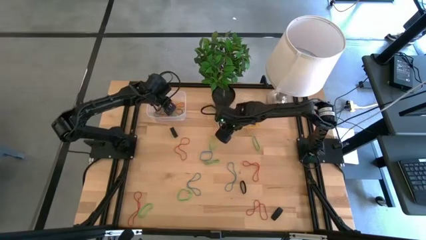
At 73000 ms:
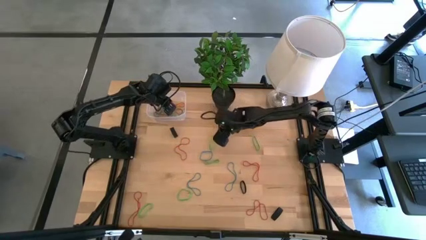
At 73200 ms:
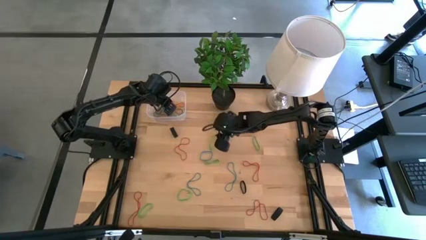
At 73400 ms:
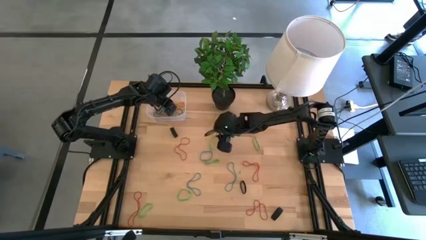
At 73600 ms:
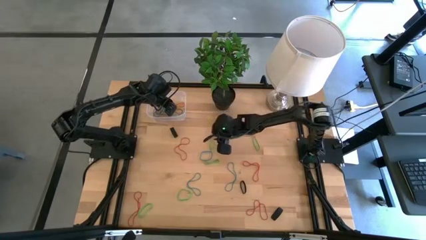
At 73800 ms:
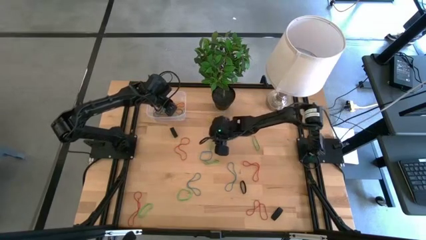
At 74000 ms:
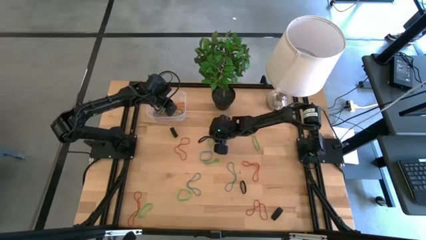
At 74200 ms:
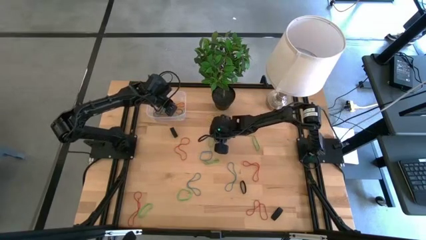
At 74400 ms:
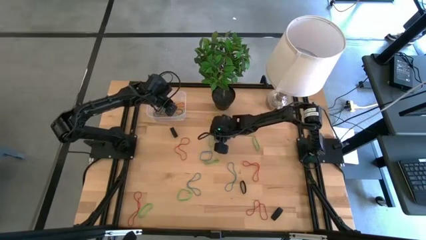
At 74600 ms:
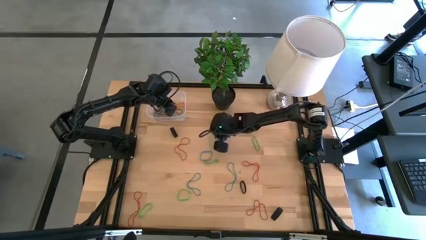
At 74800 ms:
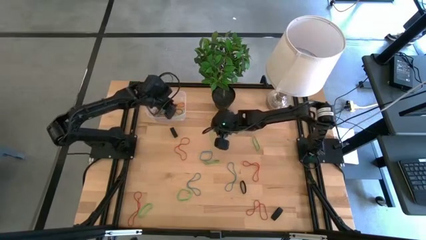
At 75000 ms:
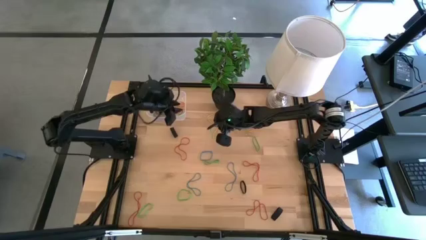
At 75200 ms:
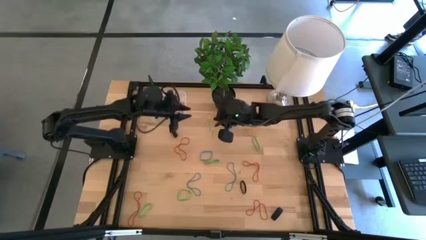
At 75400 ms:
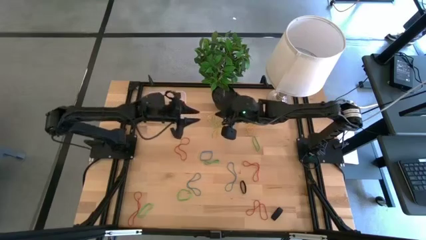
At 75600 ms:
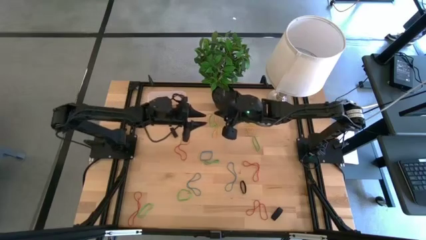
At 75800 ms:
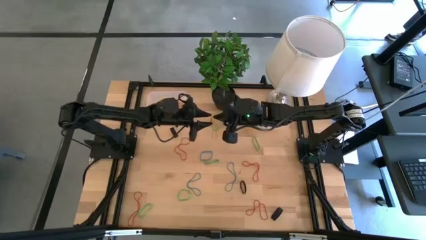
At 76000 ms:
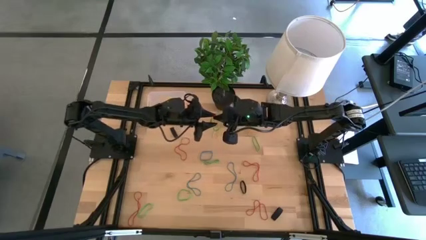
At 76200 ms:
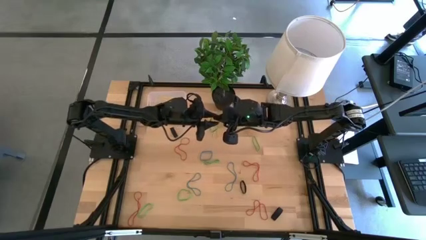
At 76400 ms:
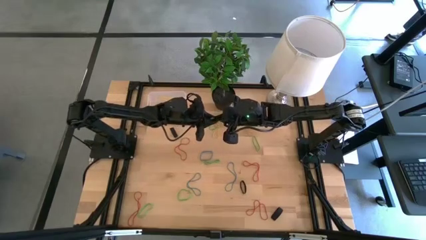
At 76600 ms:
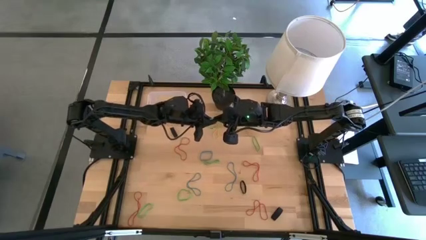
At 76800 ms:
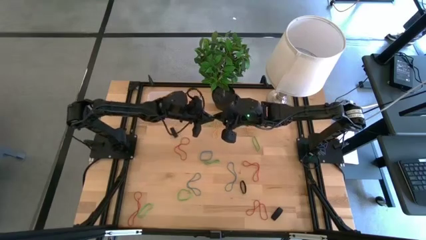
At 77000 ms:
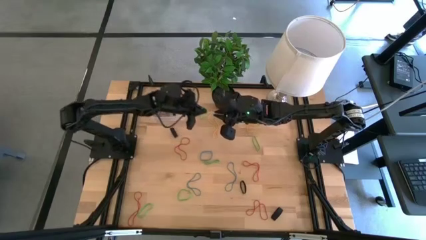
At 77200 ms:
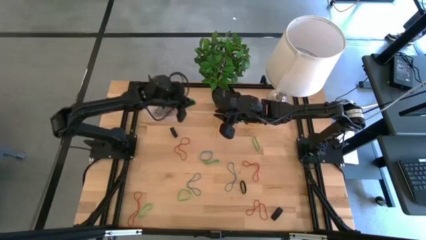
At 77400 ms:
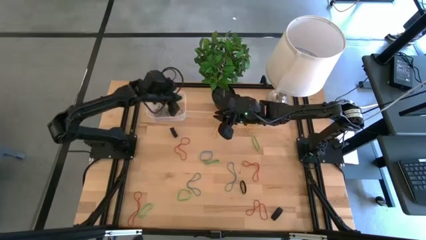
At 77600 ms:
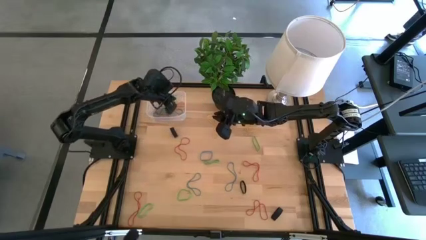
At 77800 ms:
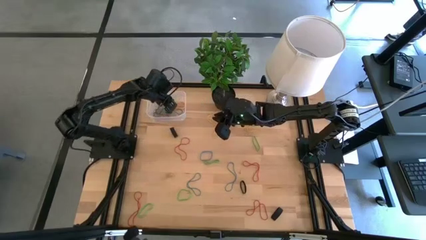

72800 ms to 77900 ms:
Task: Pick and place rubber bands into bin
Put the green rubber band into the transparent bin

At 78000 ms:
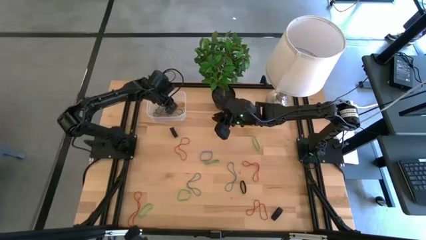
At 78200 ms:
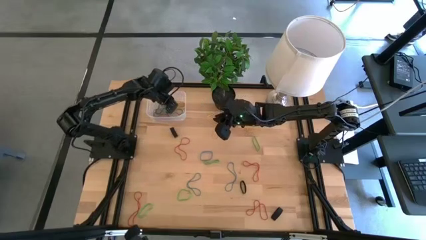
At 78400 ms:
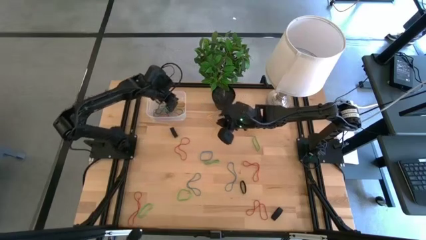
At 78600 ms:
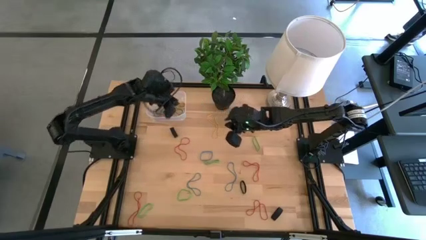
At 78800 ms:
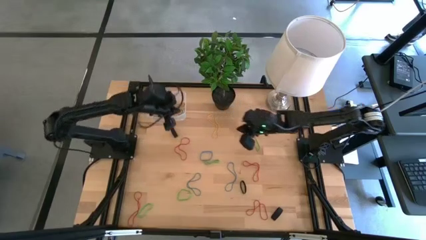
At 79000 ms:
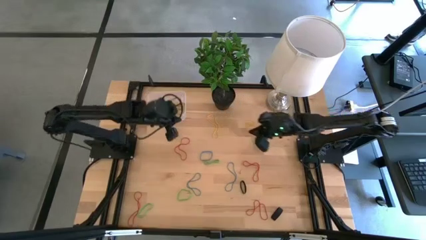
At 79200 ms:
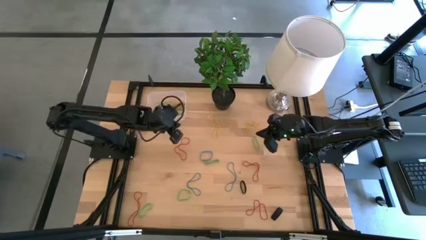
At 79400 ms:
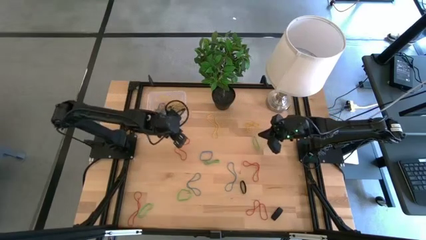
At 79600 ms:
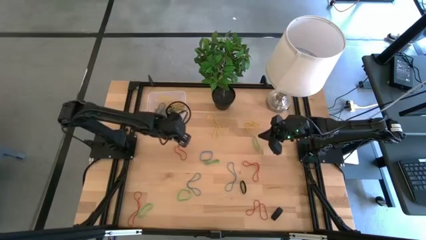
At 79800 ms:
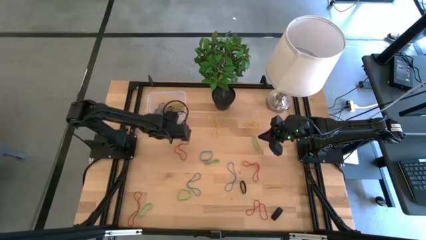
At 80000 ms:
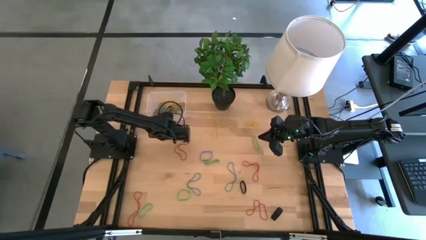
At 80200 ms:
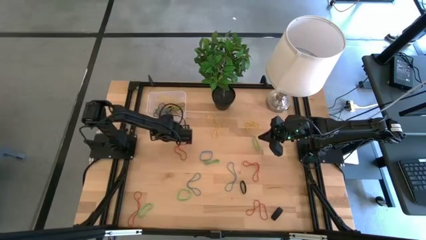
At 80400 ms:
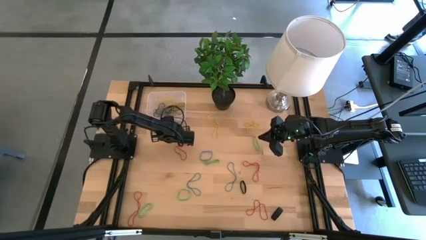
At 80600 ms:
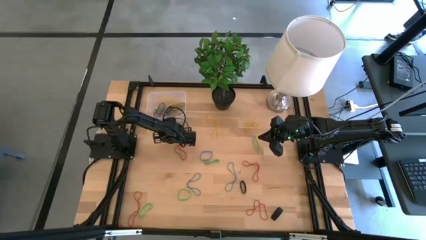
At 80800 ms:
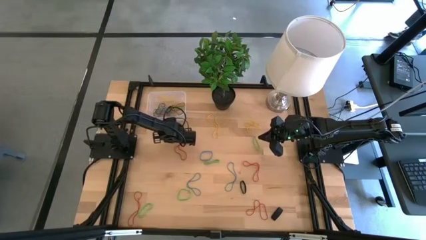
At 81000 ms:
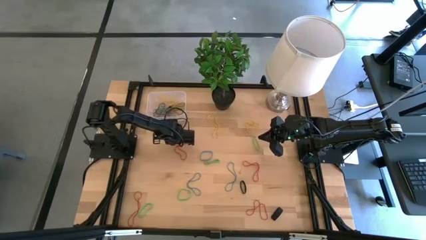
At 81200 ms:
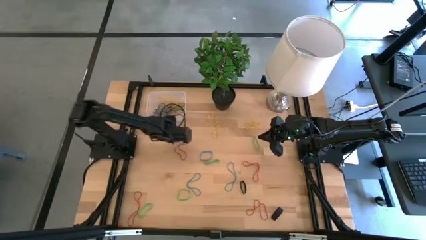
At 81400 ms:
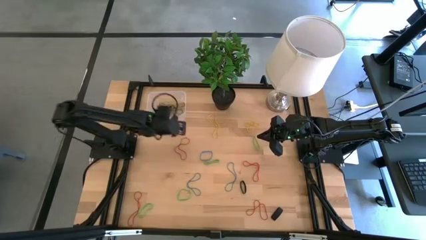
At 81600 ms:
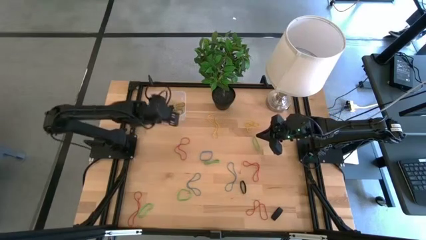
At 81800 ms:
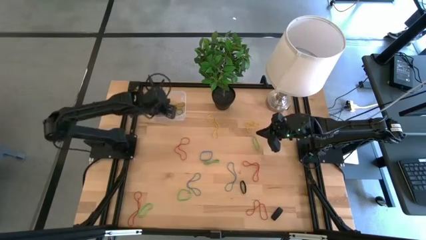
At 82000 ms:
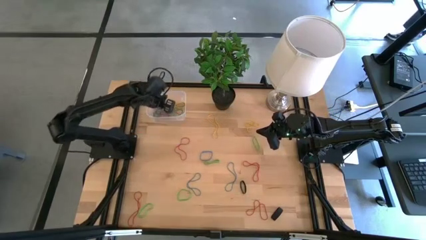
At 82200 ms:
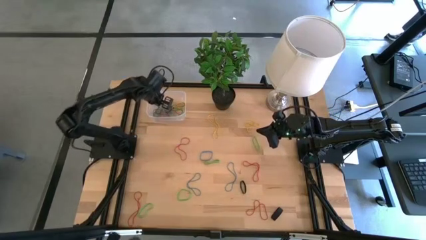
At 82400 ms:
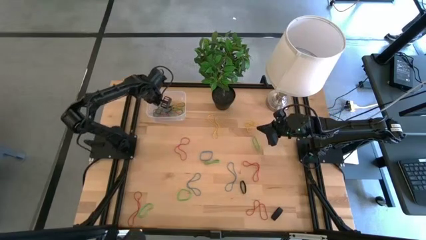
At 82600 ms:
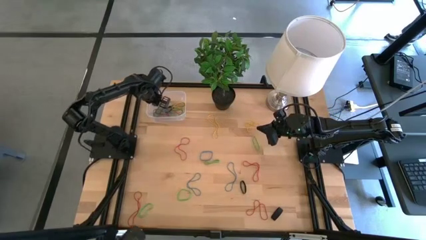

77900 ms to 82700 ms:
Put the black rubber band into the transparent bin

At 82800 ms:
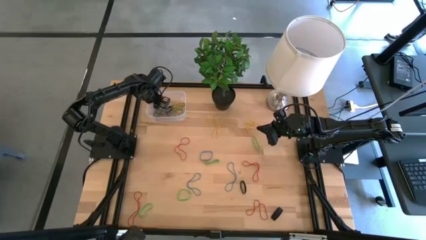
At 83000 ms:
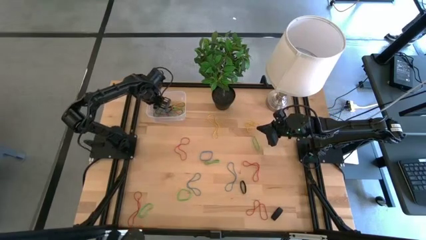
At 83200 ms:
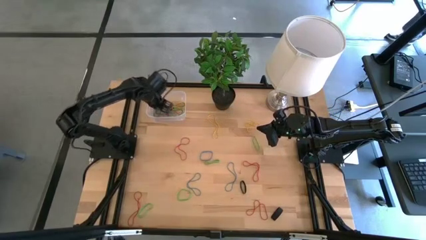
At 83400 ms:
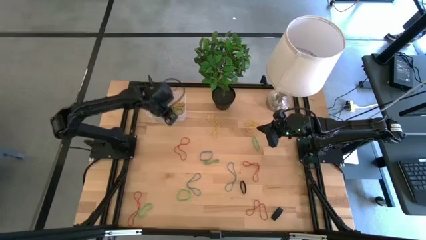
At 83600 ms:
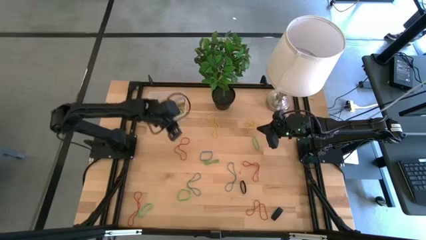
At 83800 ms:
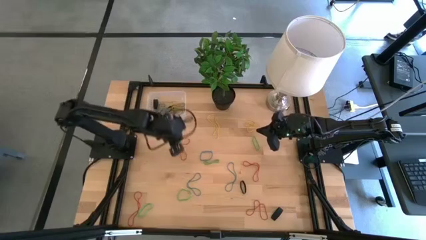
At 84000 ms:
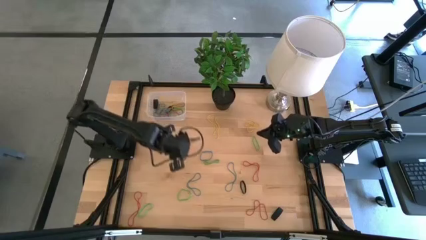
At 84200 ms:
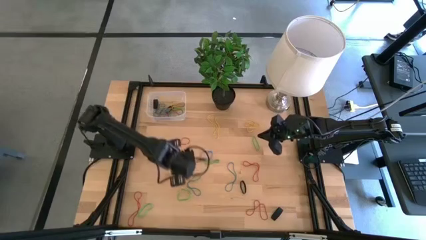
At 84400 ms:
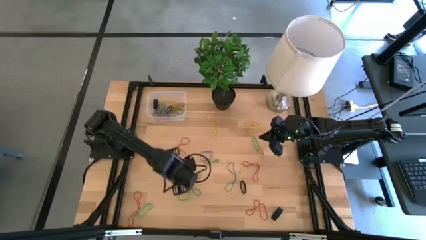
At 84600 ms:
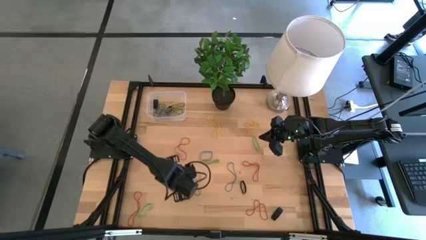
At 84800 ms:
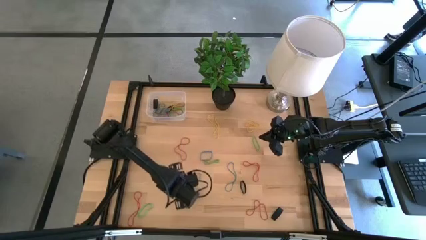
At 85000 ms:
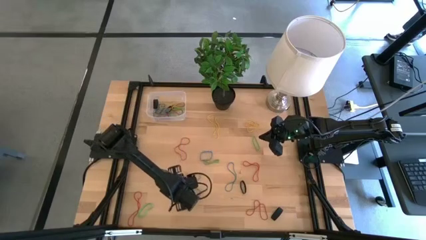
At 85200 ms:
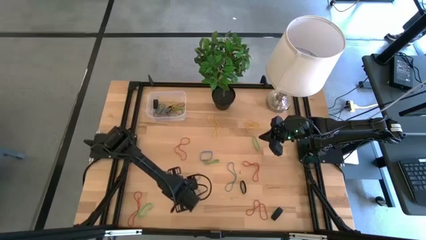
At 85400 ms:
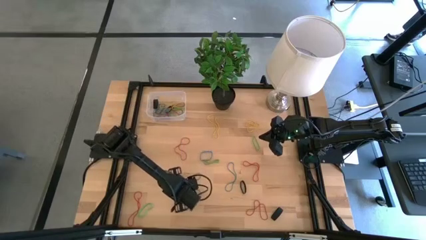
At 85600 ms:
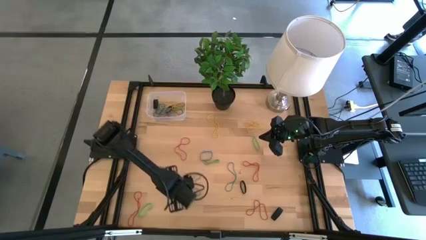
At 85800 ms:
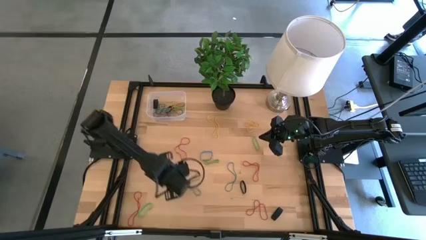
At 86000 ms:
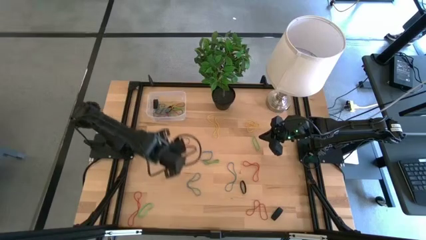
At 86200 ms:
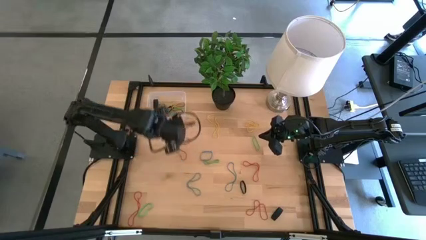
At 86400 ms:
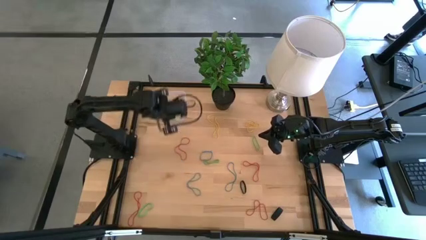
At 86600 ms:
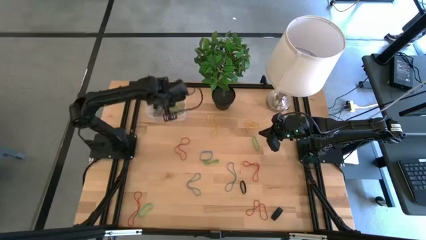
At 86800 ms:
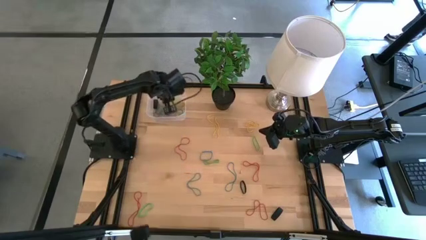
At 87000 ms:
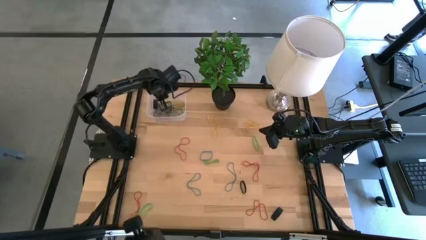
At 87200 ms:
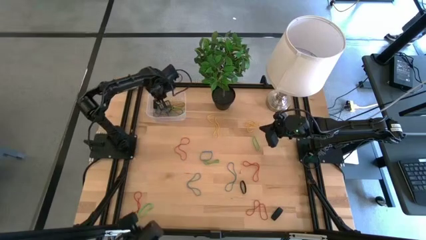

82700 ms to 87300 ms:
Put the green rubber band into the transparent bin

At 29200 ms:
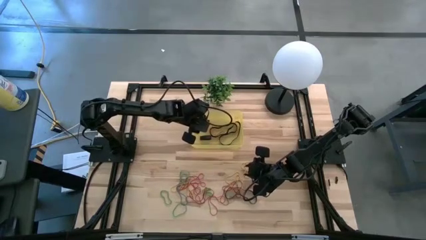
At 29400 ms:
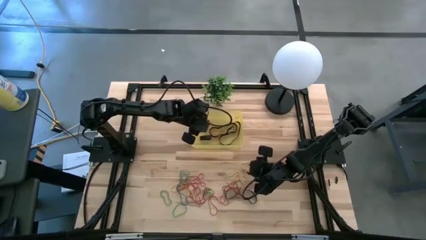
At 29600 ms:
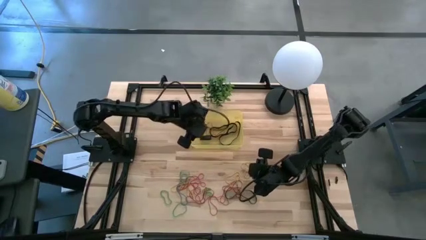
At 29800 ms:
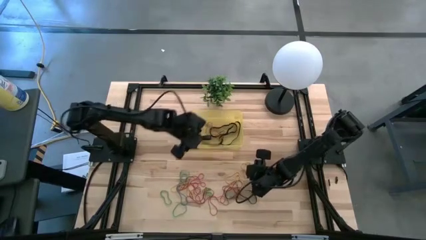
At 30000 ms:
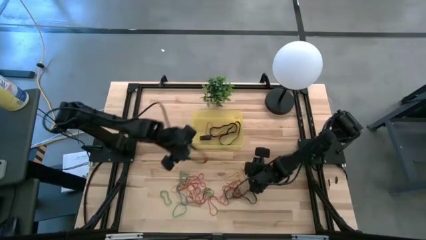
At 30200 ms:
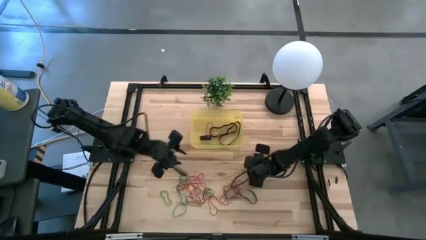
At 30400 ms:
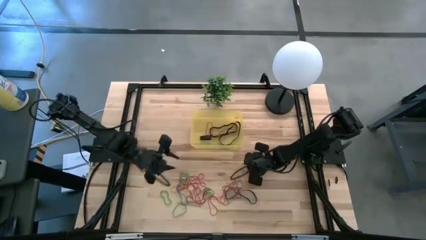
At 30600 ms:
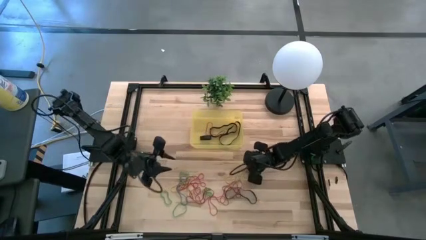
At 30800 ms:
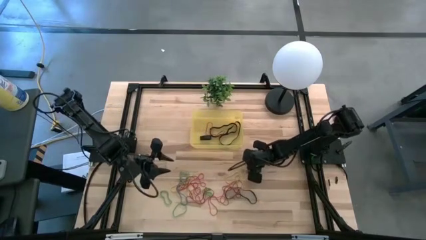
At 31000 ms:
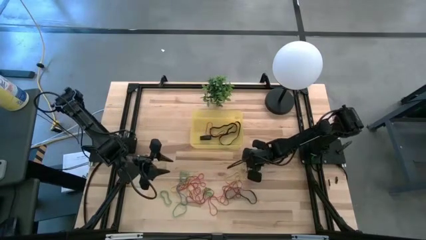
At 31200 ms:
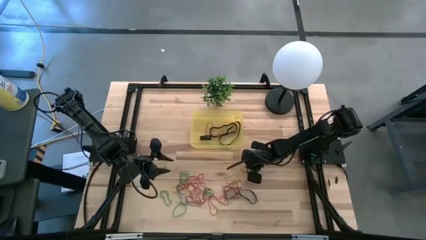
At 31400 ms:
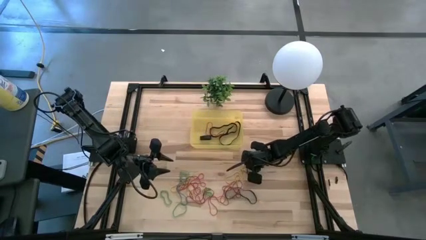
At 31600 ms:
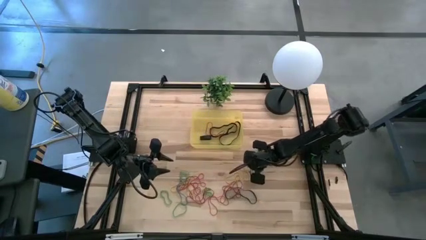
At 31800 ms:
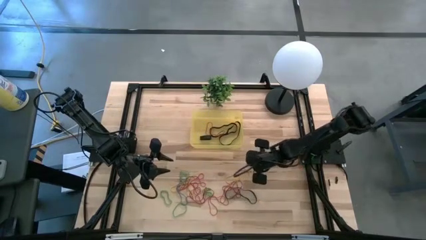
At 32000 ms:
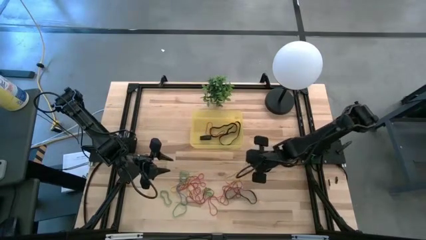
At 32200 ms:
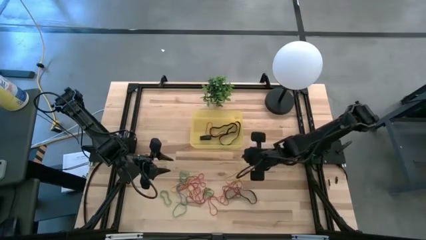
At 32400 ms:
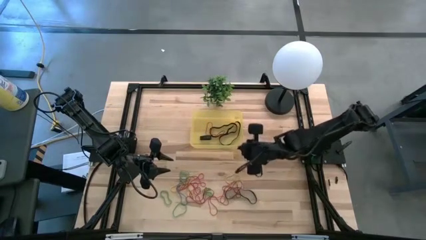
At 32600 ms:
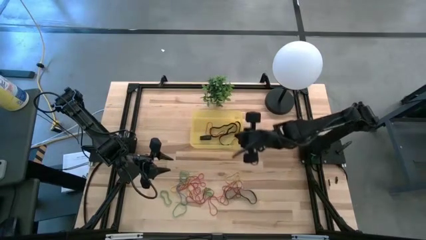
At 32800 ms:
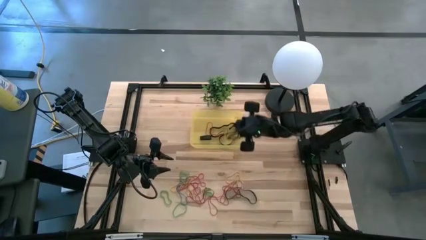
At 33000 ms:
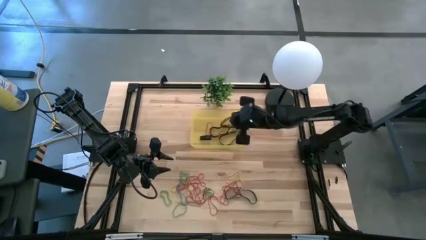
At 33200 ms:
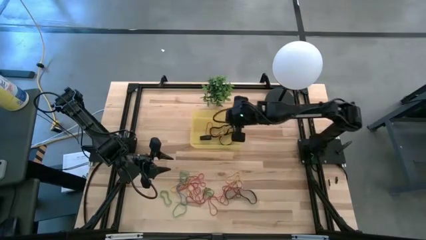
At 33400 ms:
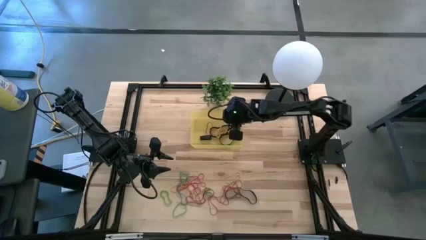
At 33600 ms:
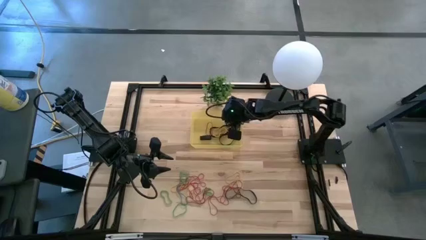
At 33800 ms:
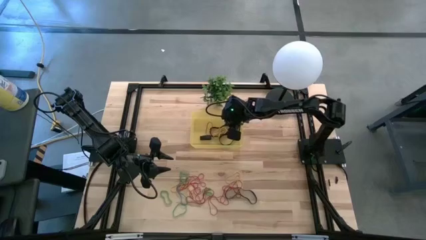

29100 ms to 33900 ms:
Task: Pick and place rubber bands into bin
Put the yellow rubber band into the yellow bin
